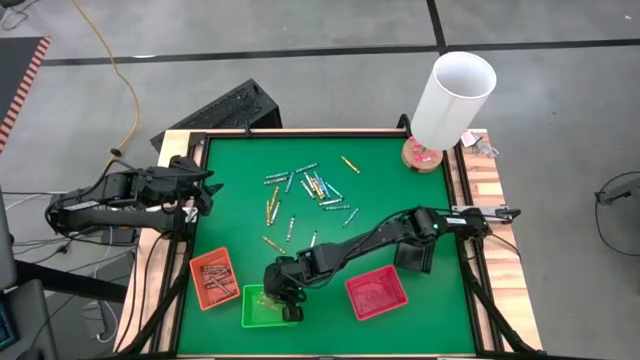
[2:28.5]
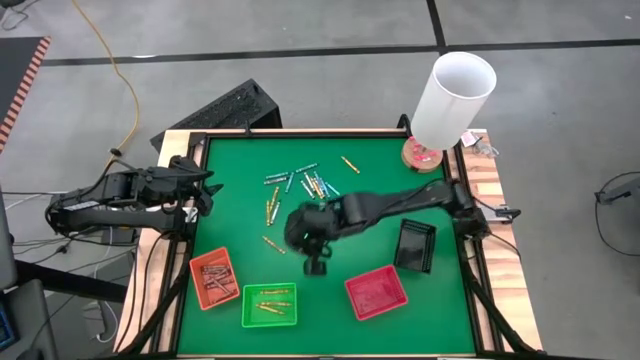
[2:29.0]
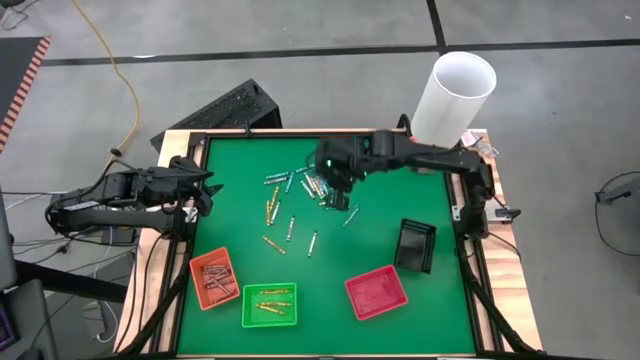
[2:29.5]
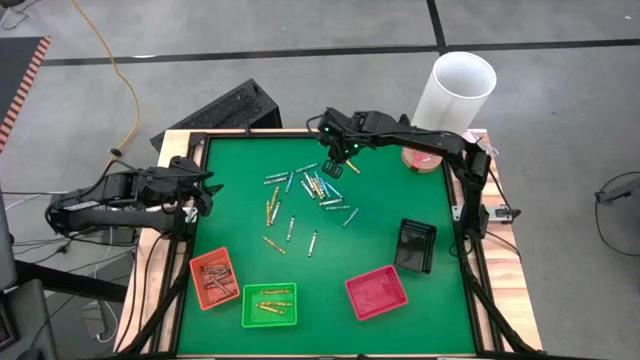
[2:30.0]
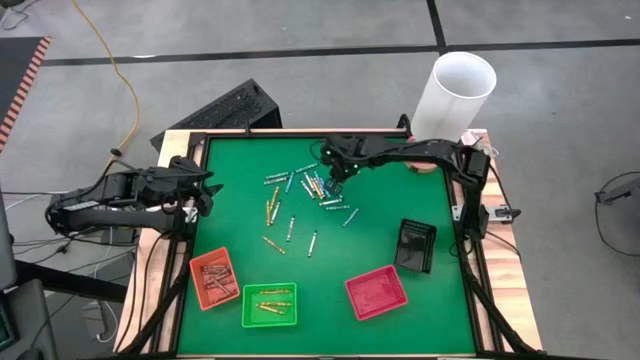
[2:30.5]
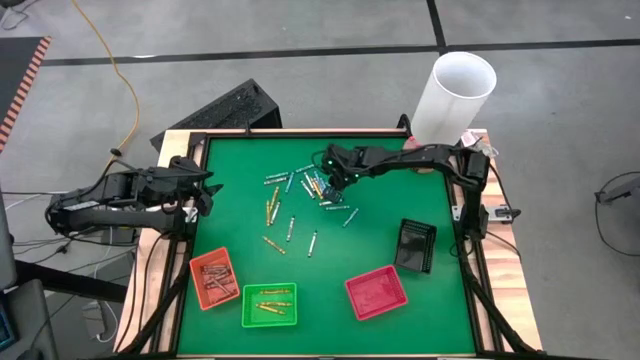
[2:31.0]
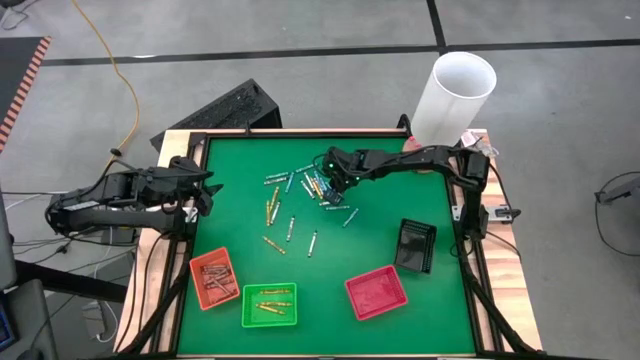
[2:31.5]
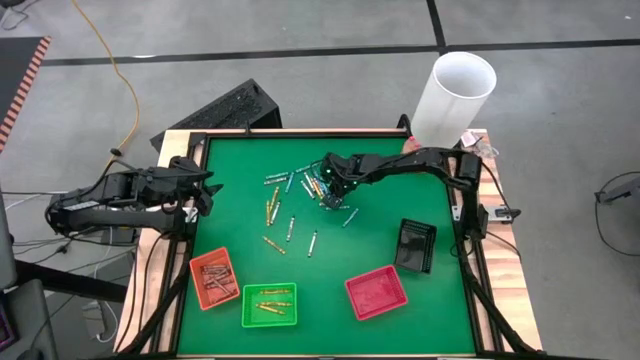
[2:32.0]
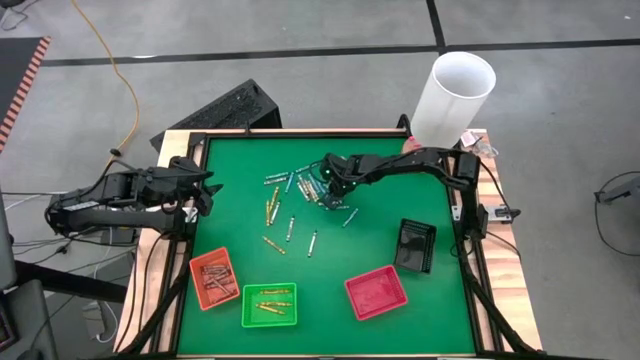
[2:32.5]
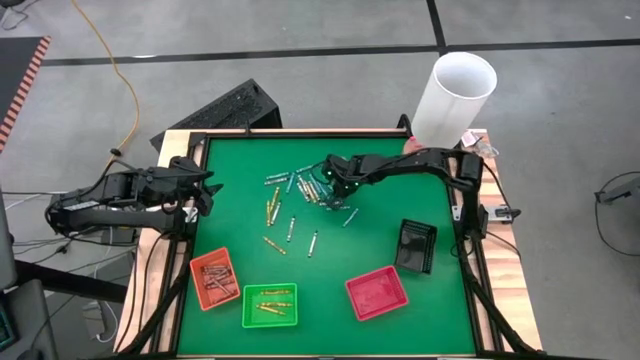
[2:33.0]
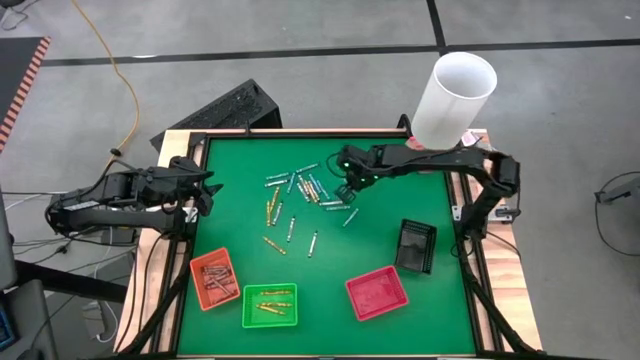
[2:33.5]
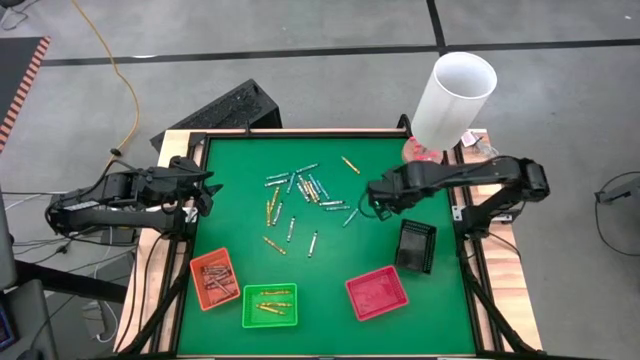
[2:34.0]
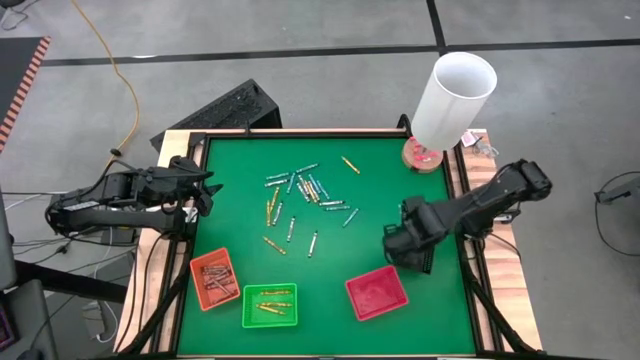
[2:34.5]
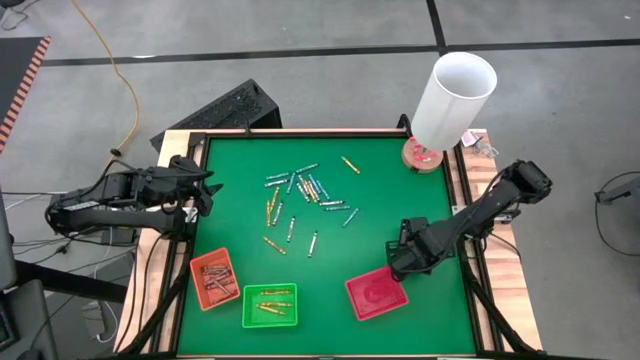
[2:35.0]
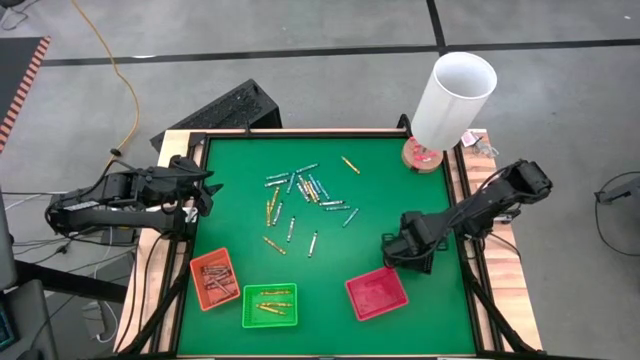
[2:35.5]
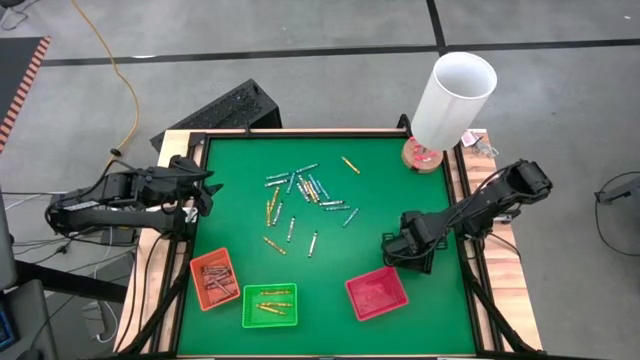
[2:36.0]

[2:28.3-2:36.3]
Task: Sort crayons
Put the blue crayon into the black bin

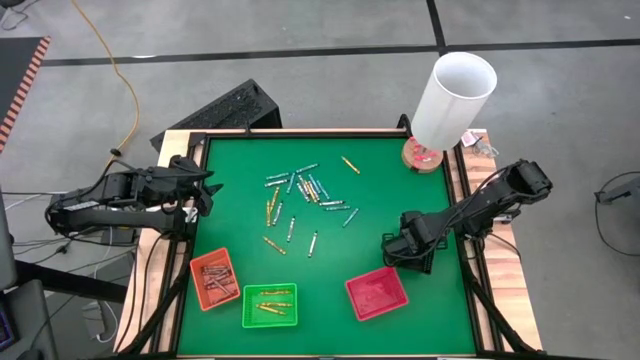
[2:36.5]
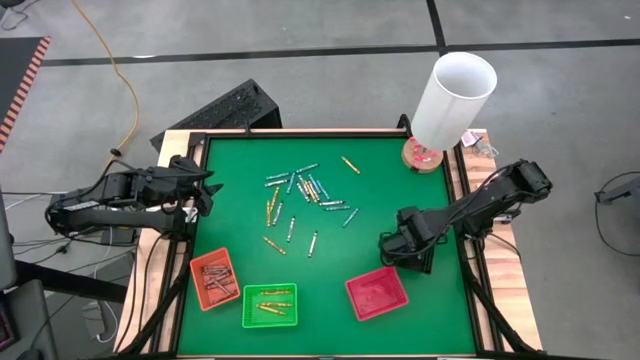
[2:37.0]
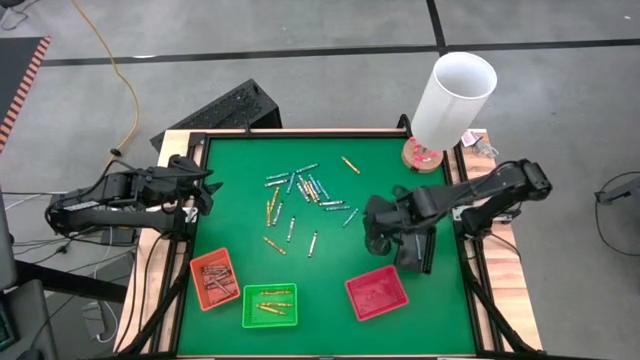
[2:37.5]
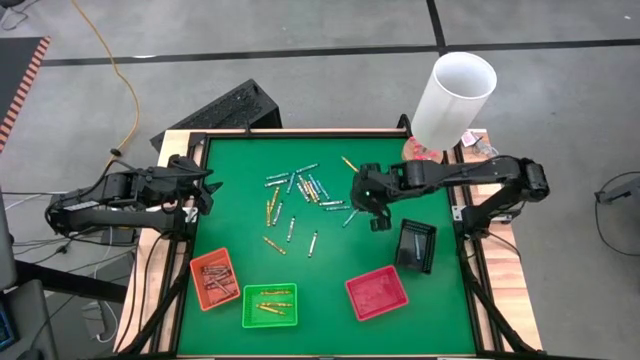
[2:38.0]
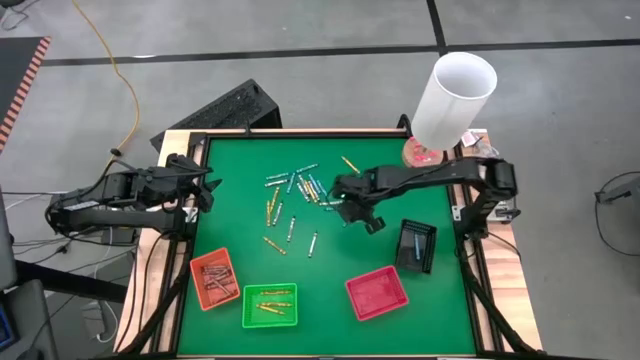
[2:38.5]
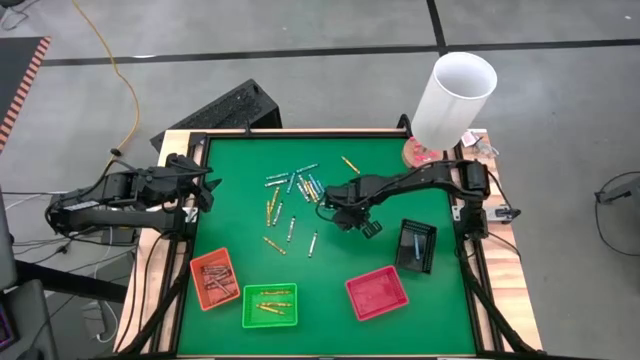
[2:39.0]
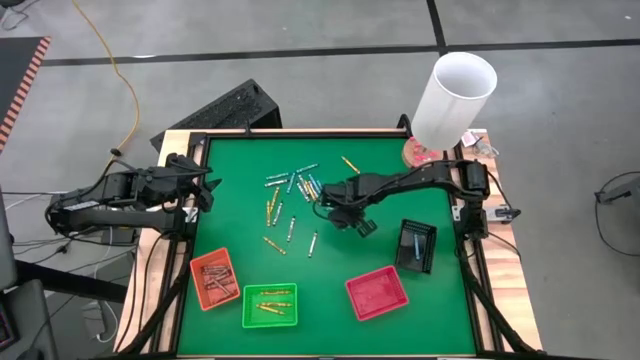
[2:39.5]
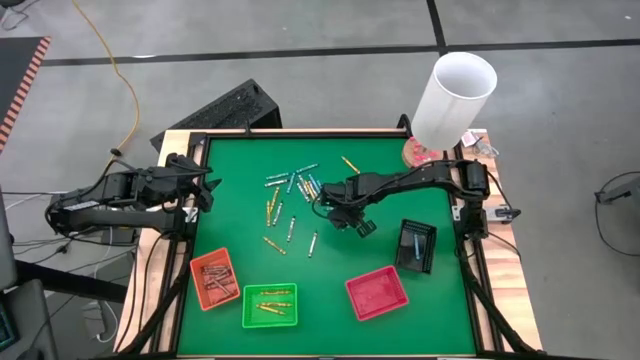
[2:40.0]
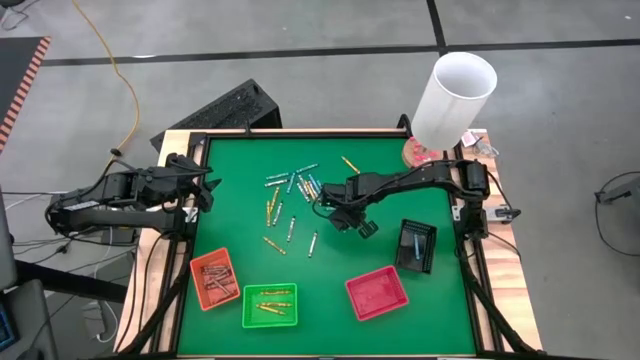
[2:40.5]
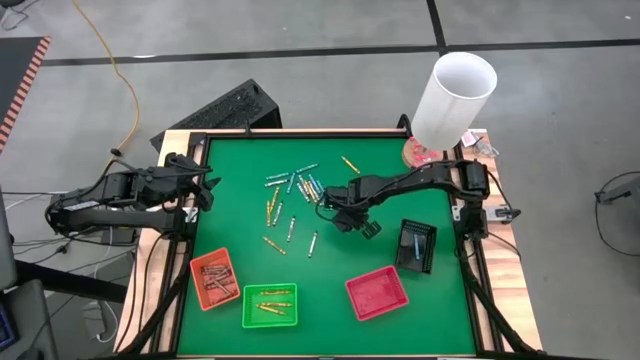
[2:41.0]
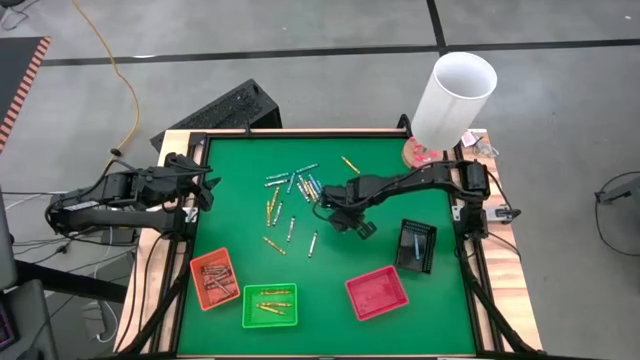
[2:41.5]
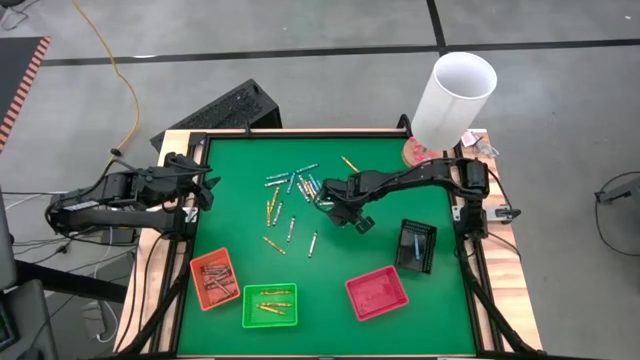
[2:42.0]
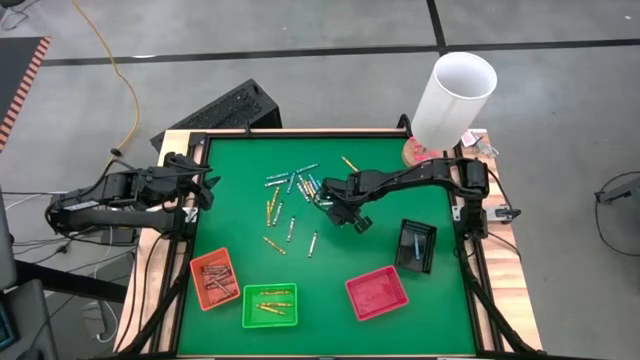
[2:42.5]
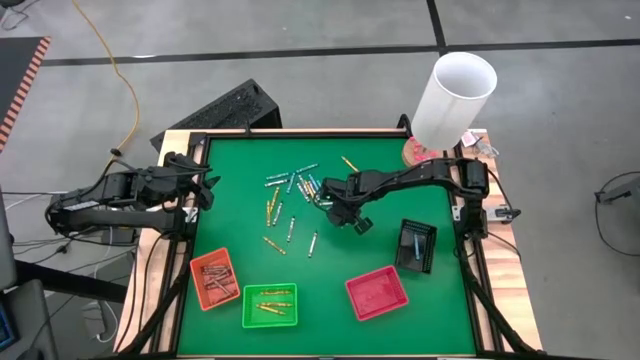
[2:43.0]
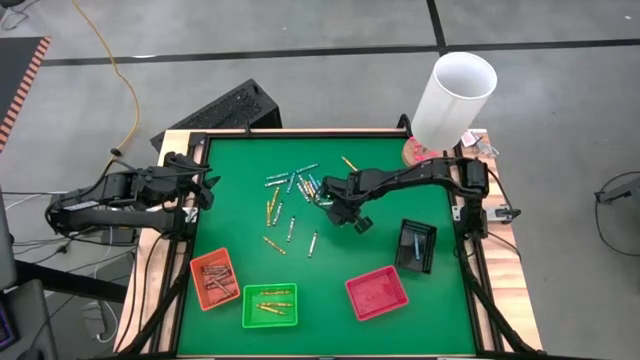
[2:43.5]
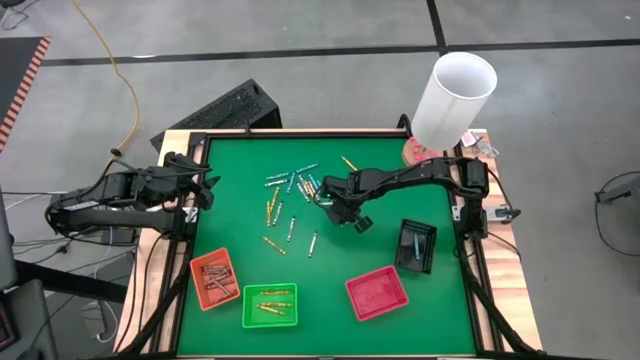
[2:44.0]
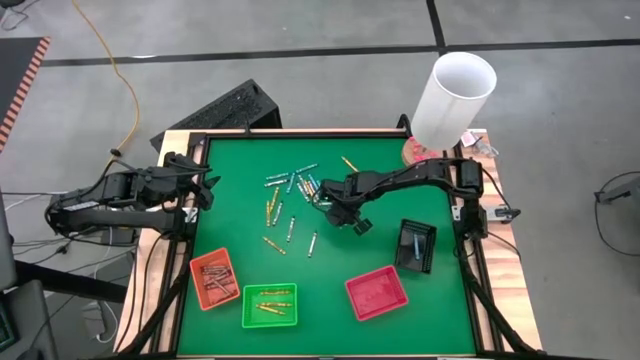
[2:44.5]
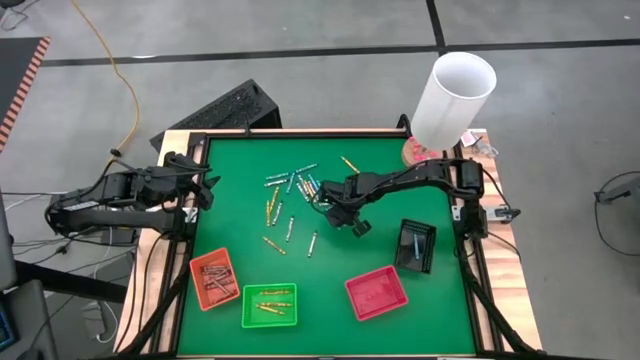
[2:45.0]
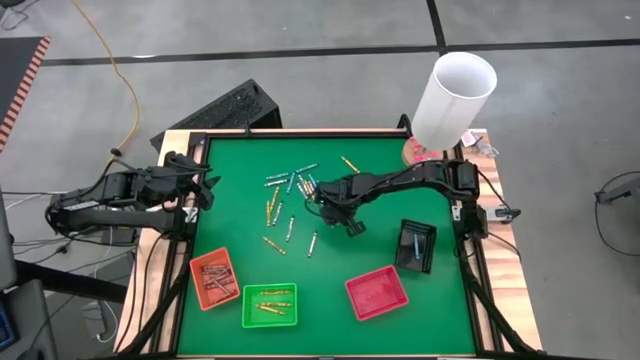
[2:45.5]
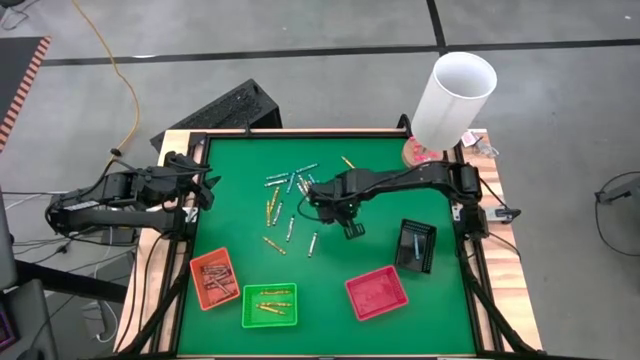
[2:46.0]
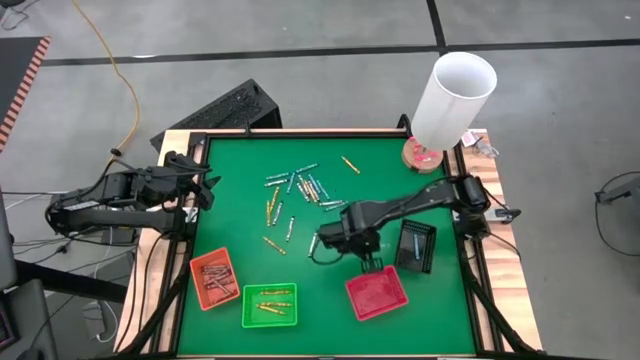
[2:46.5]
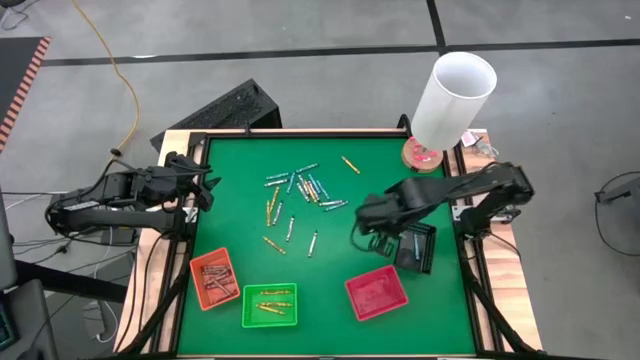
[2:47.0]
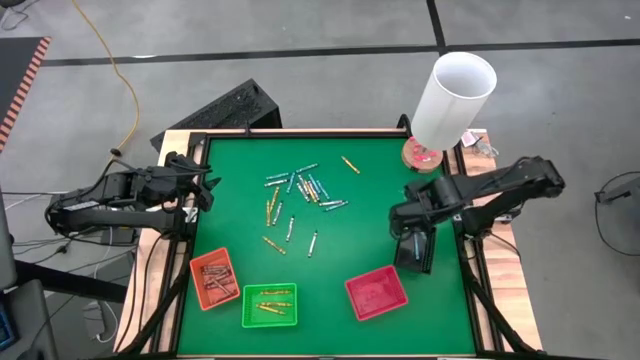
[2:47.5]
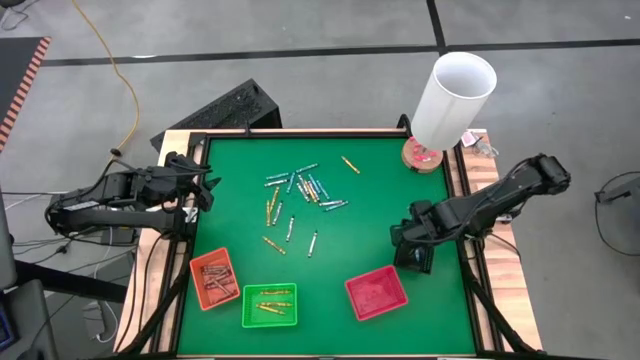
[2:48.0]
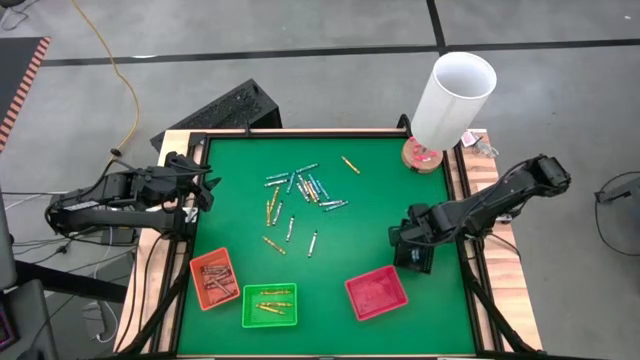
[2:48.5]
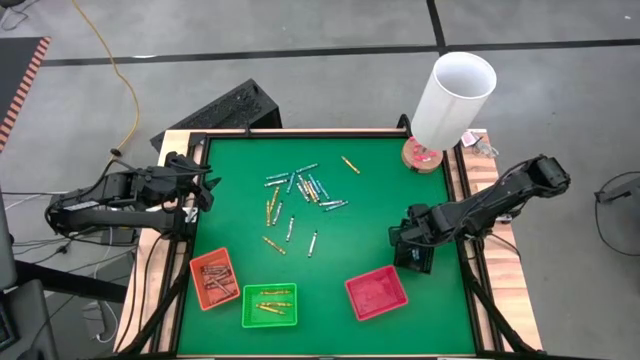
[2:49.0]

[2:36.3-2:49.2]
Put the blue crayon into the black bin
